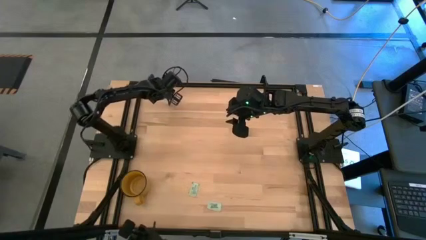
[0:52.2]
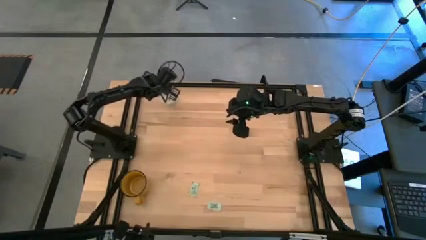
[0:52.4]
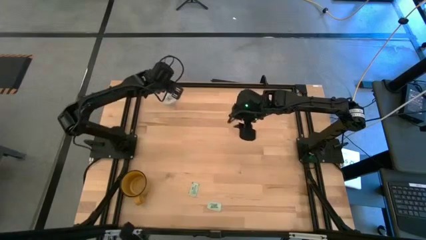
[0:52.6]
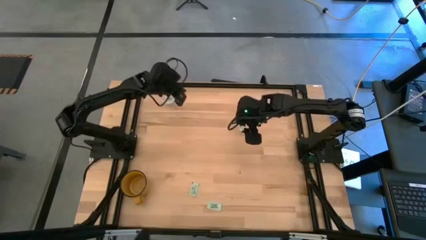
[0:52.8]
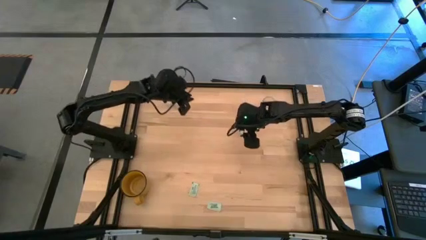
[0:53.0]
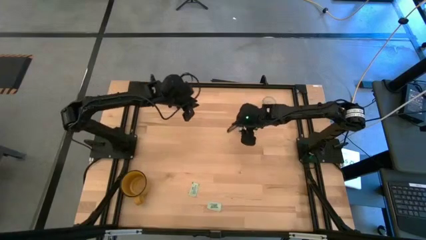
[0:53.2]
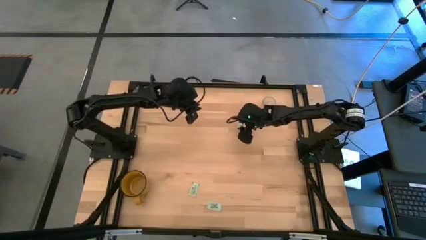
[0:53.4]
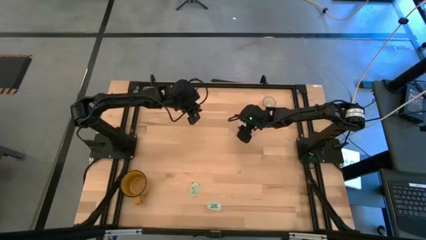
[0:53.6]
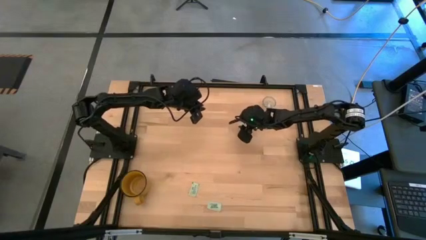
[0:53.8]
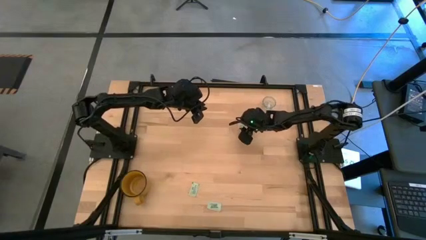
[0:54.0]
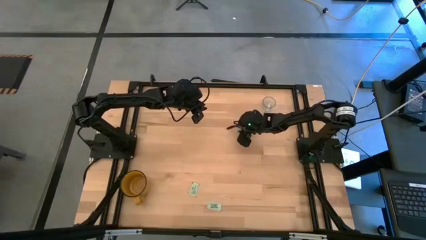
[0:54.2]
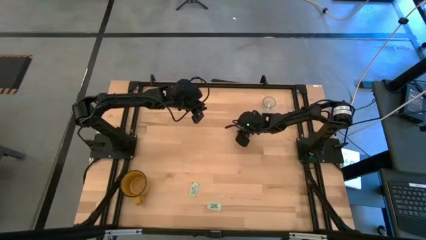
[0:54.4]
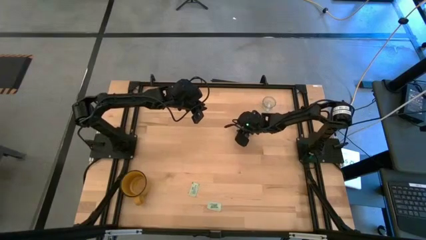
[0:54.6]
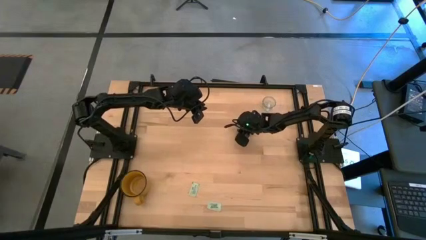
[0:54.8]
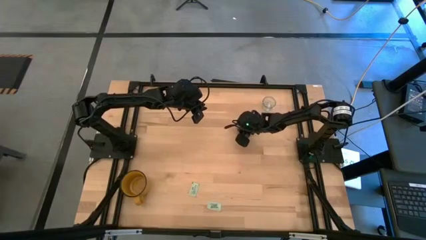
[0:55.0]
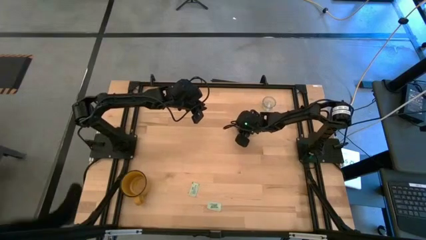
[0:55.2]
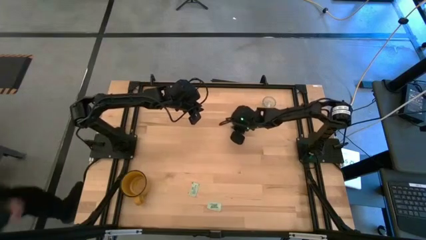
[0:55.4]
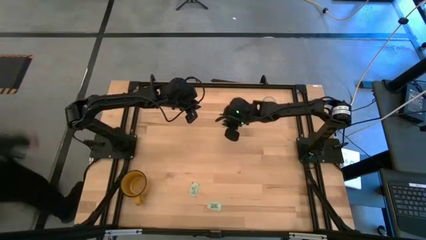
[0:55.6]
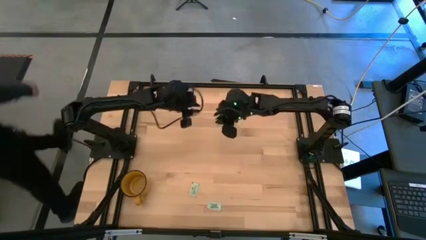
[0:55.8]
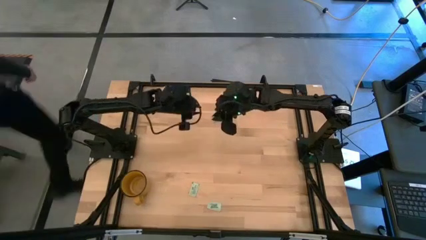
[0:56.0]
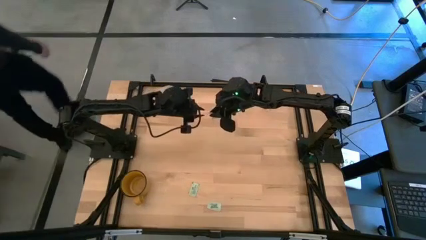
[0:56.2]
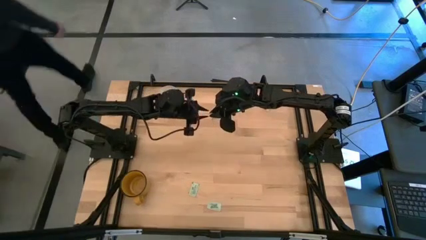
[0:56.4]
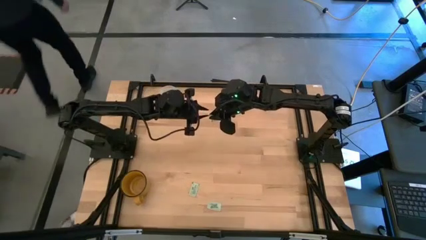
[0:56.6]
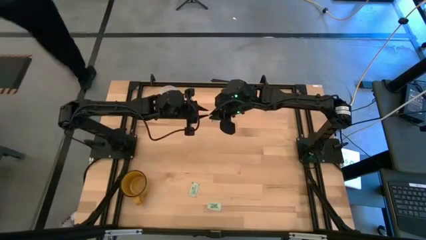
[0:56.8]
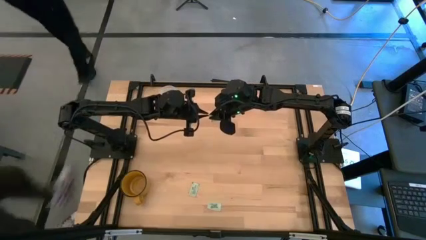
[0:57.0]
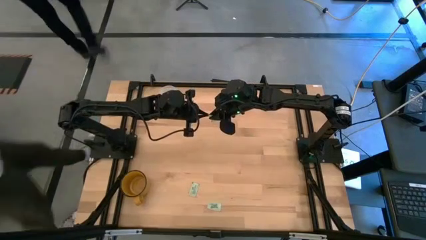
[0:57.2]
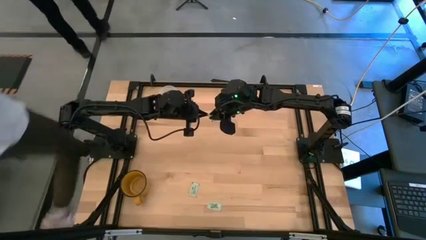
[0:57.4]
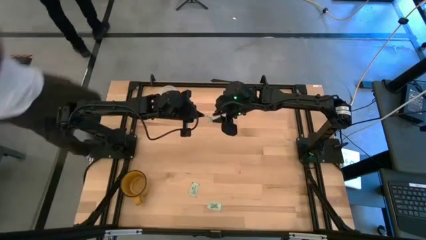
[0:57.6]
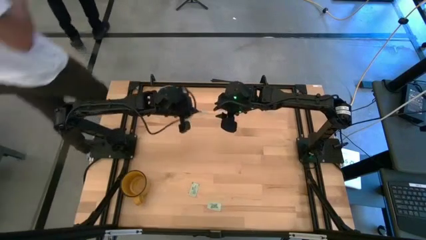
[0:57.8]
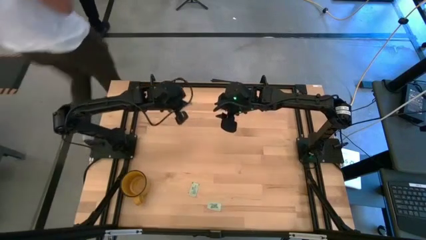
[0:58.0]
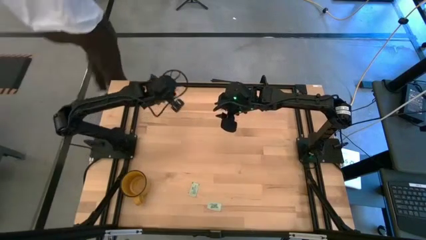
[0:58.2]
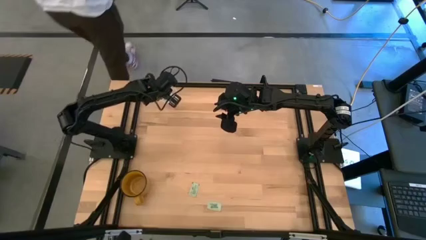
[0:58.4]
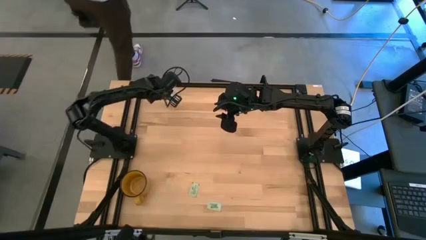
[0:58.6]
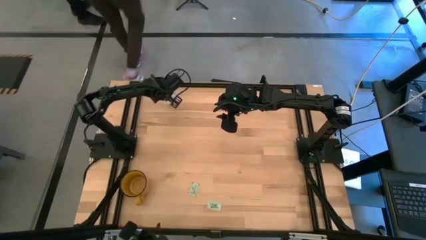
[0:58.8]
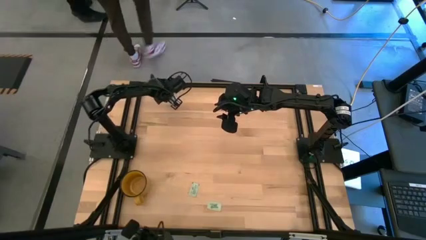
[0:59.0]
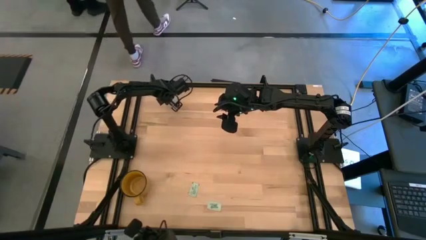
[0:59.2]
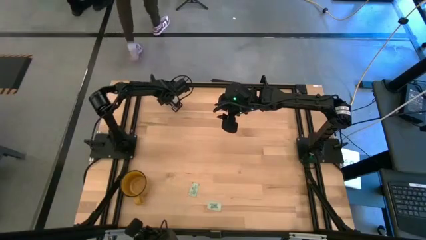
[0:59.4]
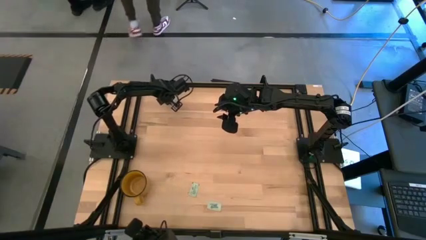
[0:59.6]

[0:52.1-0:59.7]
Task: Pick and place Stevia / Truvia into bins
Put the green stevia packet into the transparent container

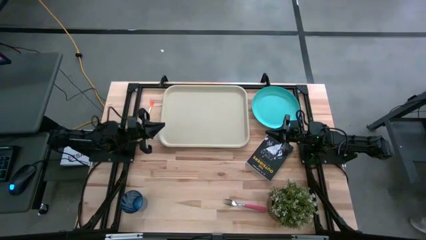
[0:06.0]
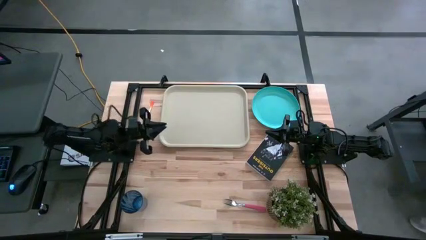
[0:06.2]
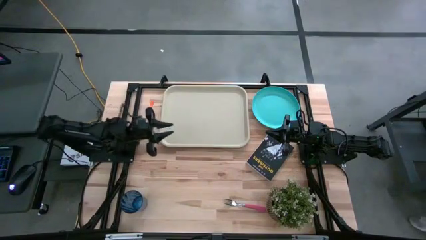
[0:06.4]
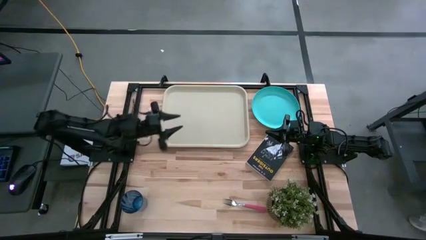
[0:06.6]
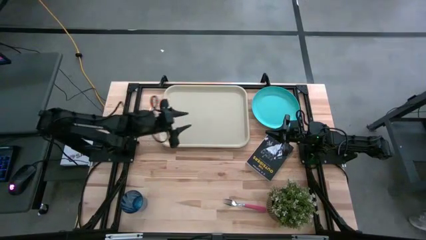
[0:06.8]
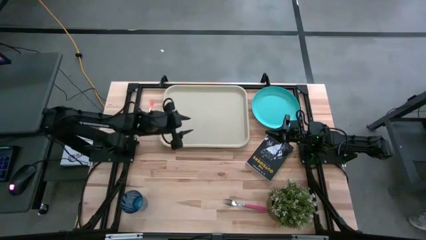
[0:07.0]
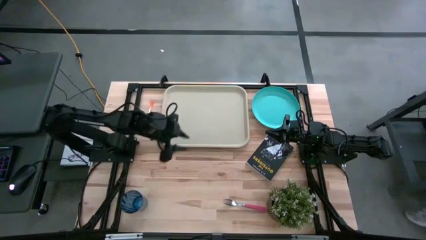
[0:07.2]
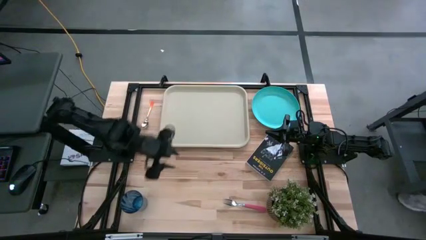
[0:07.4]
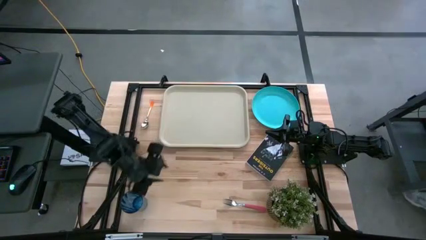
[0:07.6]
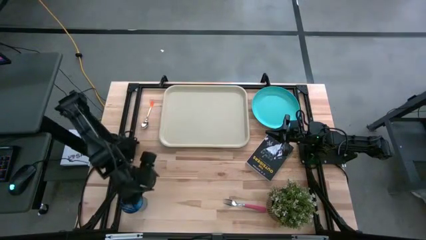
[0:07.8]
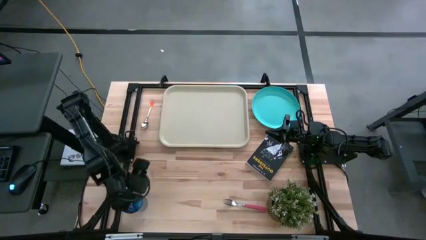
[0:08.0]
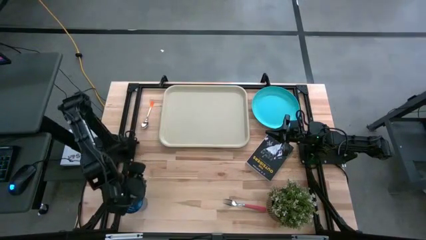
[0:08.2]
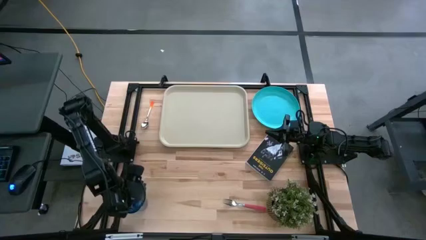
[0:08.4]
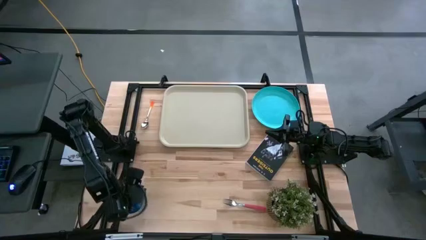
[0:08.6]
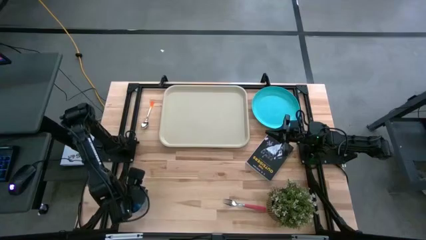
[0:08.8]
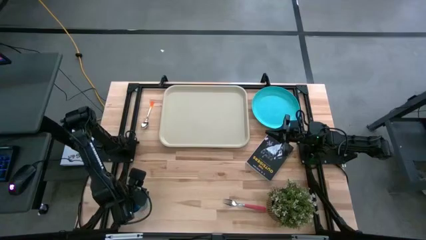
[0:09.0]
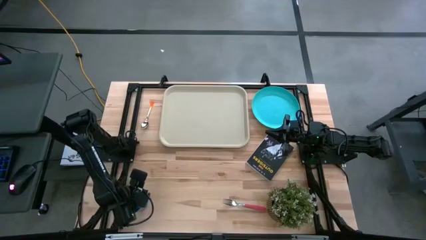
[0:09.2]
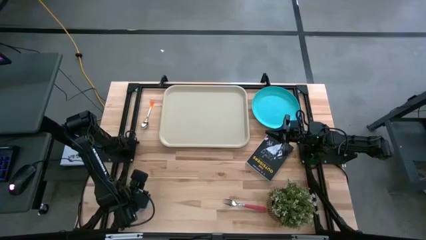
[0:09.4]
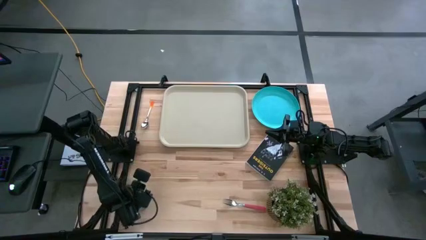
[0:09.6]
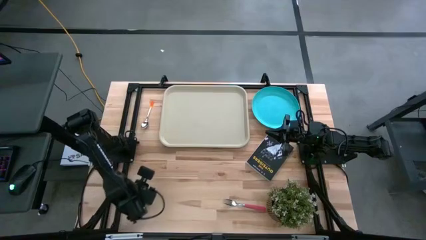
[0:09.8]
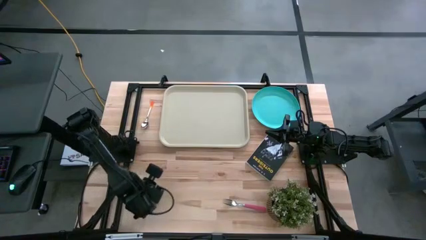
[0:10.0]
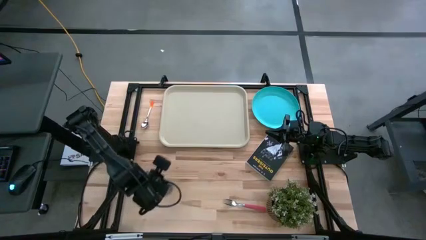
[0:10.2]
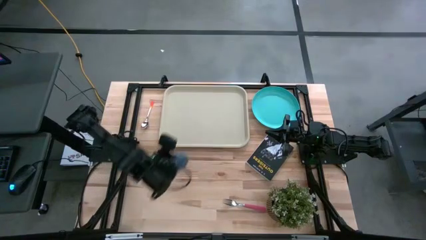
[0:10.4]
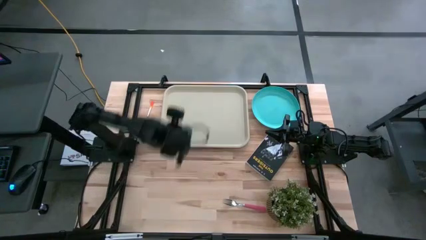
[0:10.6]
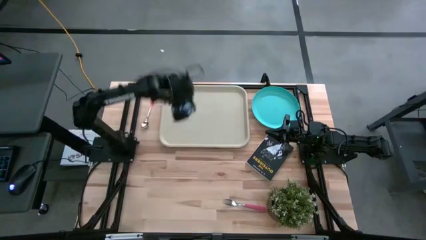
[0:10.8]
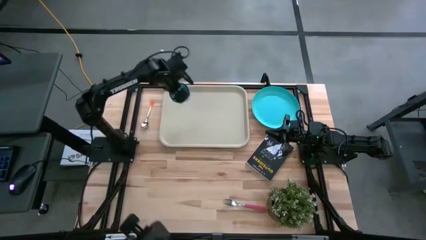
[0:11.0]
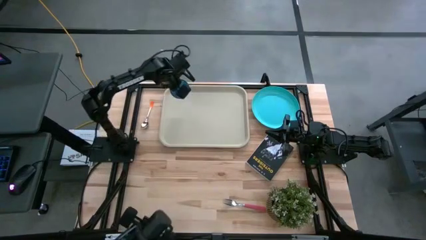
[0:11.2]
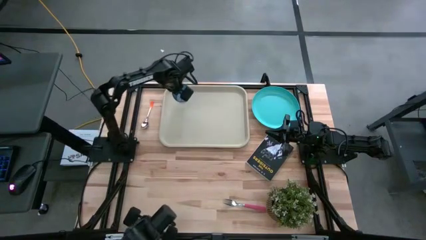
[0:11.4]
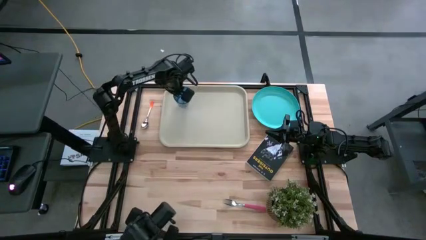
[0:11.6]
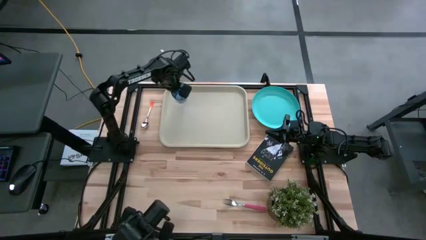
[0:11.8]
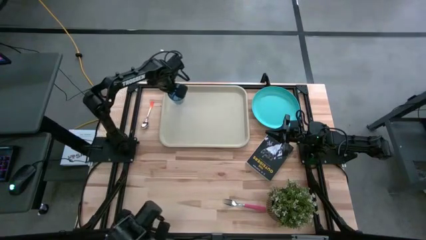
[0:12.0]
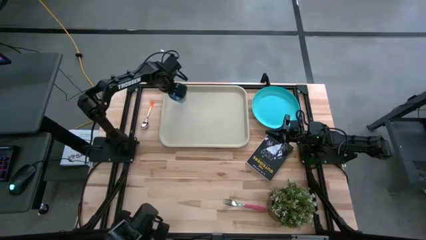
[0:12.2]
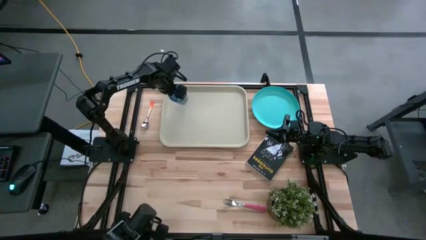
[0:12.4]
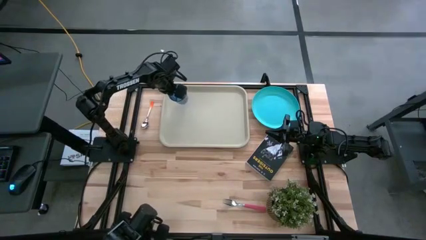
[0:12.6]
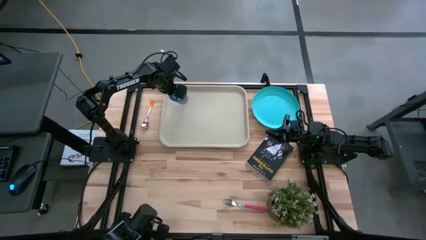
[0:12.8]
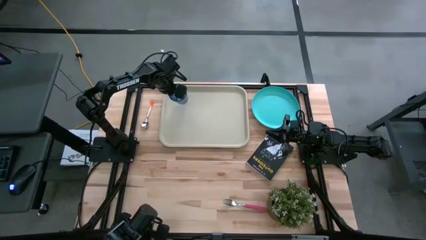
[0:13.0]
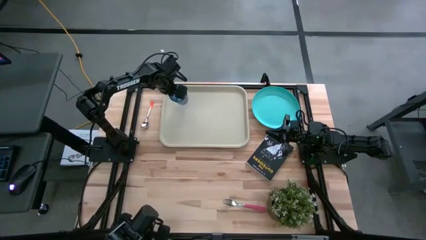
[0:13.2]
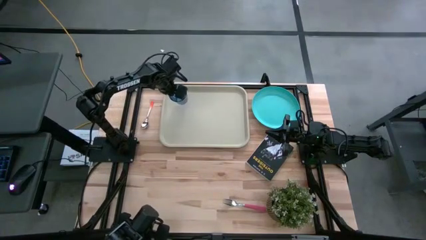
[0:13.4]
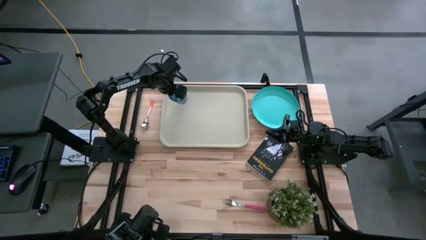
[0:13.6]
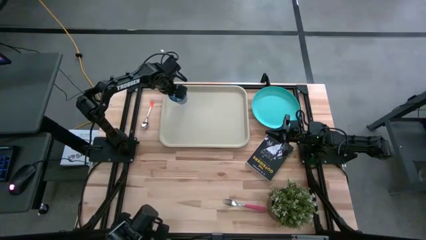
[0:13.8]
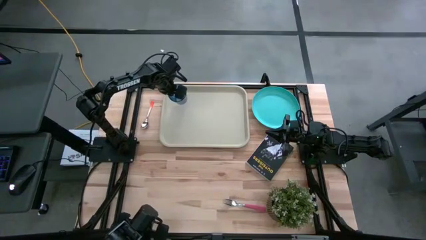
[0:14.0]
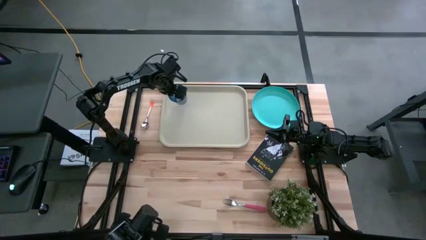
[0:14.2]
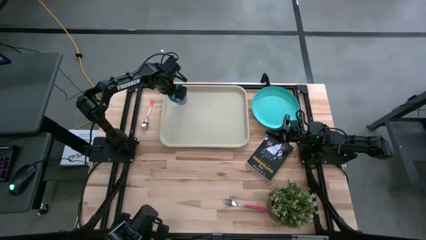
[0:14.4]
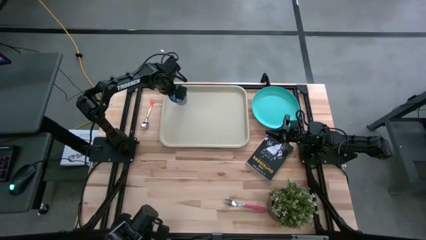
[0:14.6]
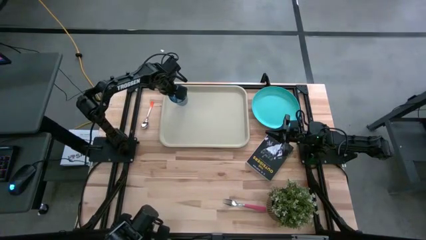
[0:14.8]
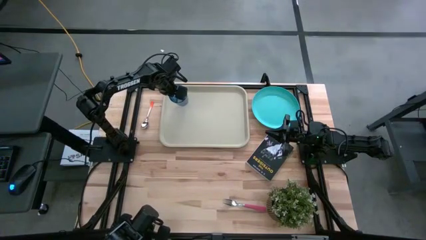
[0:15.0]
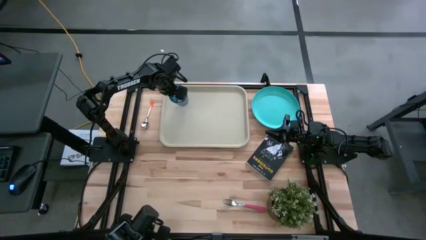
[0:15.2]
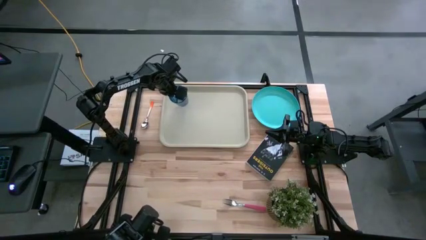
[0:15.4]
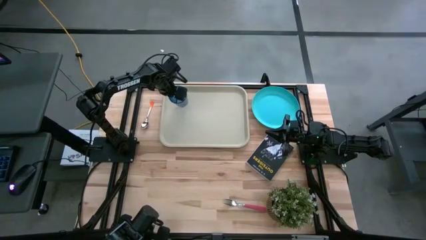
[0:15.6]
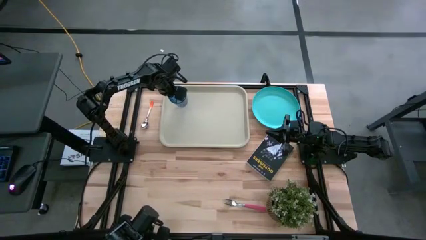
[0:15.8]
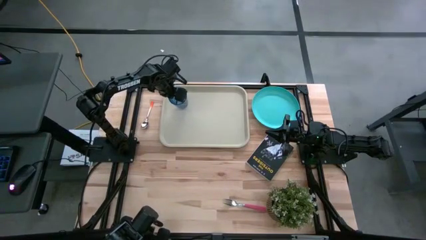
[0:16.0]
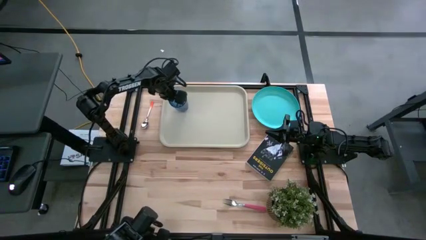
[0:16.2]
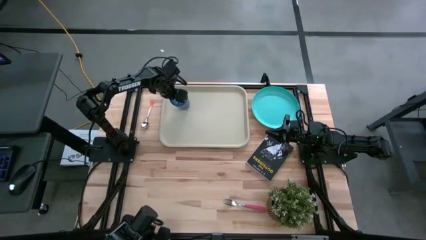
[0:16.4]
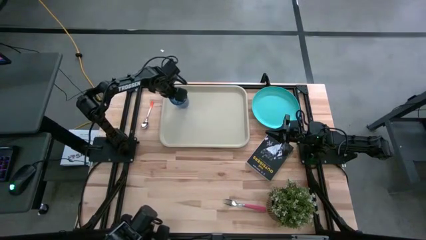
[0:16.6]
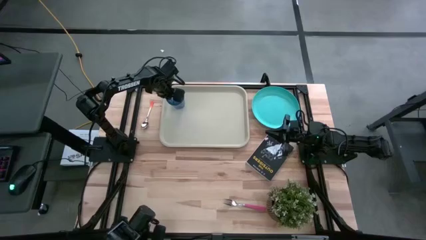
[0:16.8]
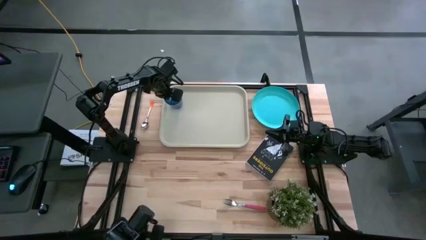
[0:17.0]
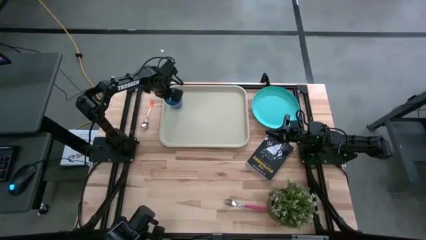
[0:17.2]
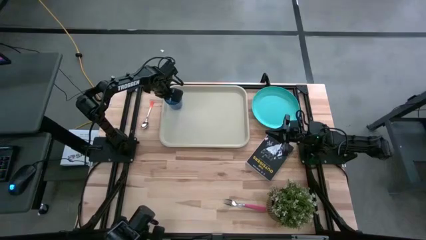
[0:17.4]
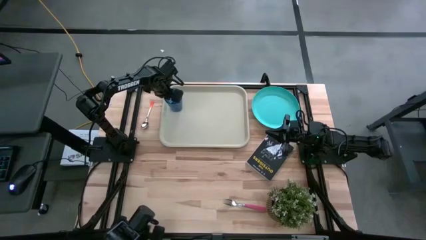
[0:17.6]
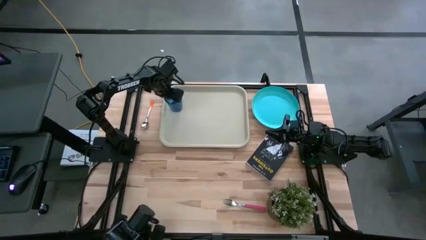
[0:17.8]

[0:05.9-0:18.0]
Task: Pick and place plate/cup/fork/spoon on tray
Put the blue glass cup on the white tray
